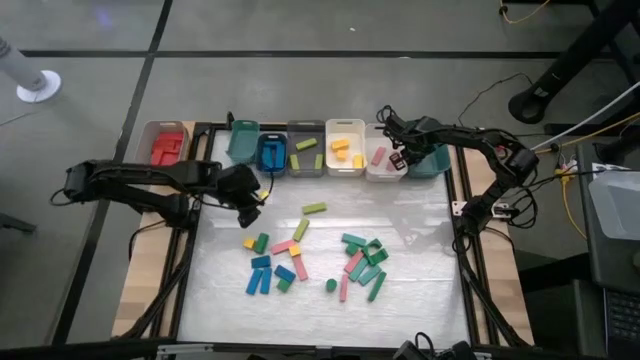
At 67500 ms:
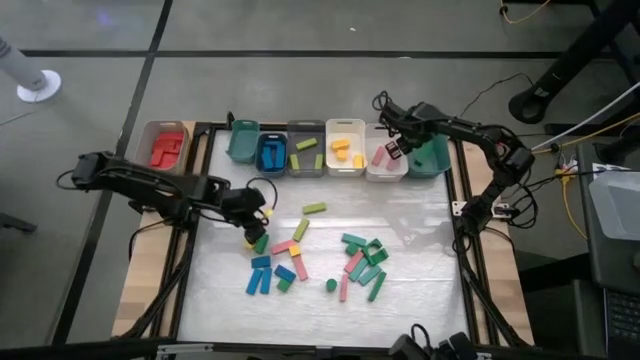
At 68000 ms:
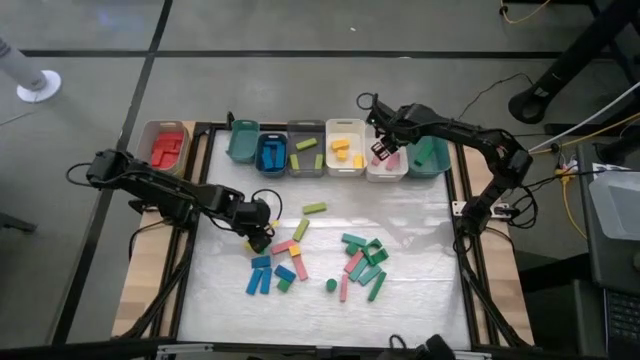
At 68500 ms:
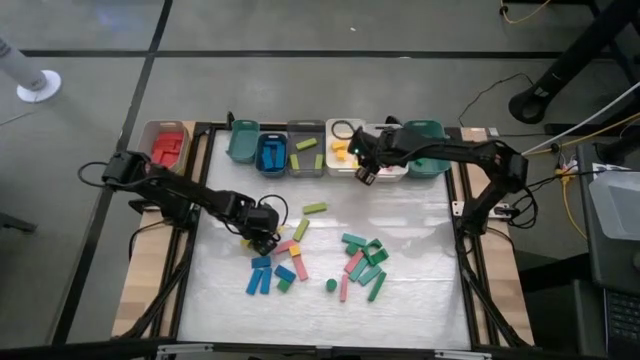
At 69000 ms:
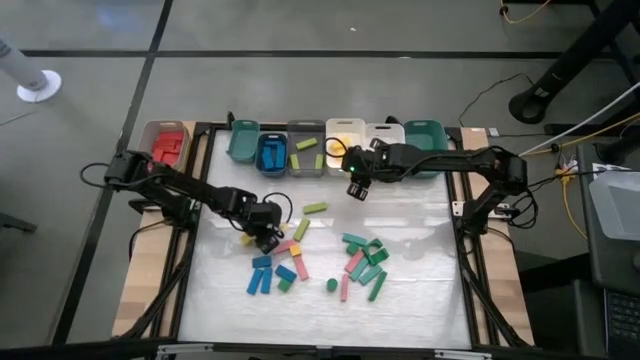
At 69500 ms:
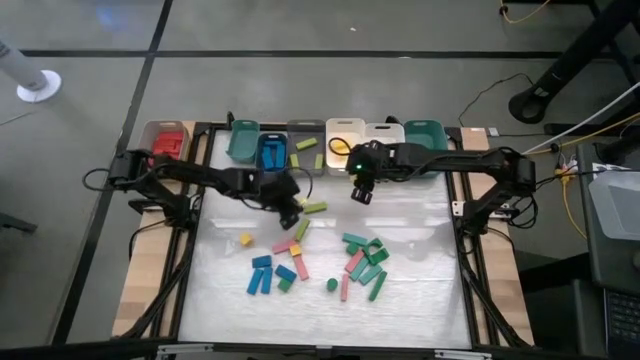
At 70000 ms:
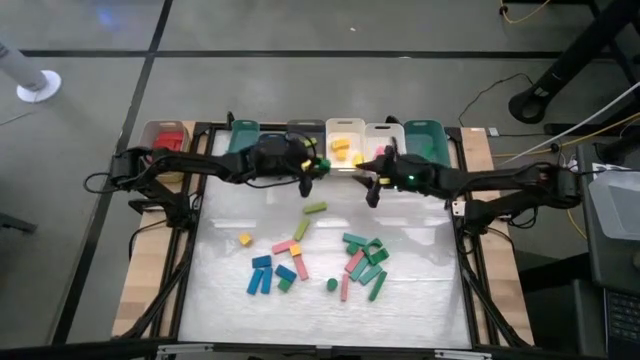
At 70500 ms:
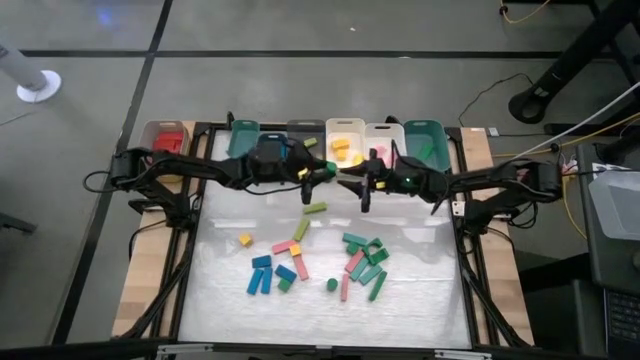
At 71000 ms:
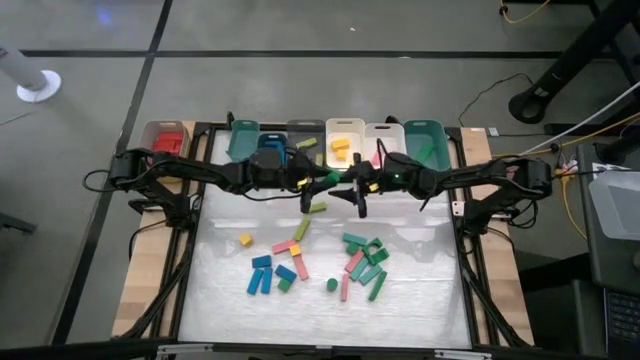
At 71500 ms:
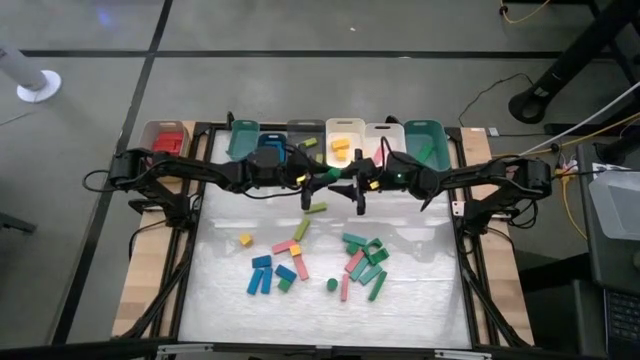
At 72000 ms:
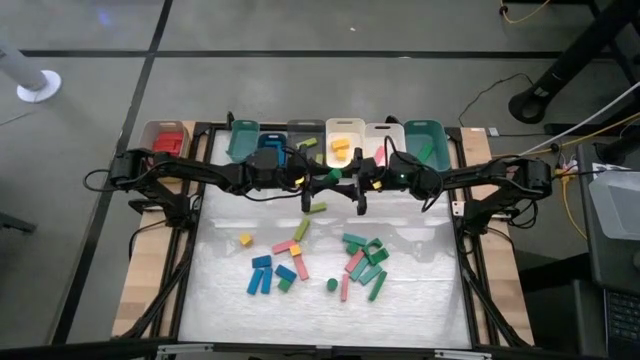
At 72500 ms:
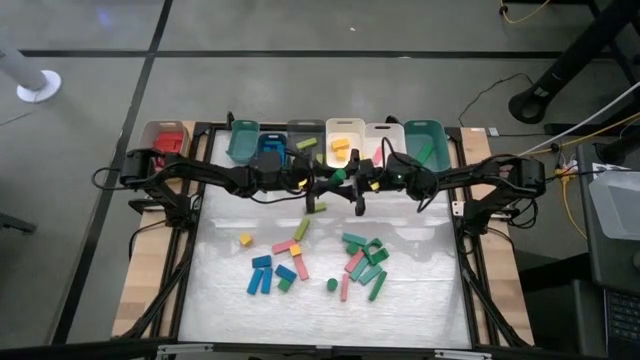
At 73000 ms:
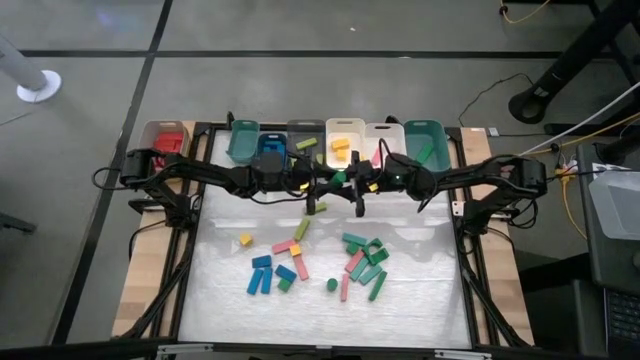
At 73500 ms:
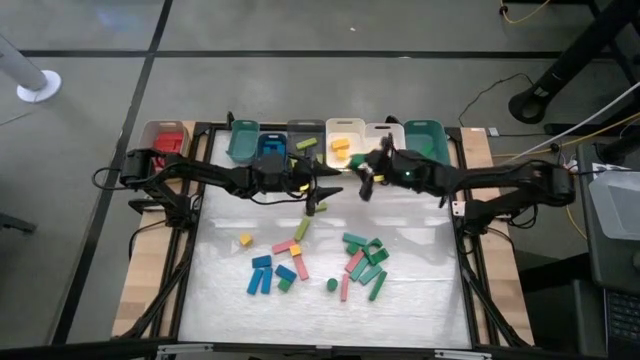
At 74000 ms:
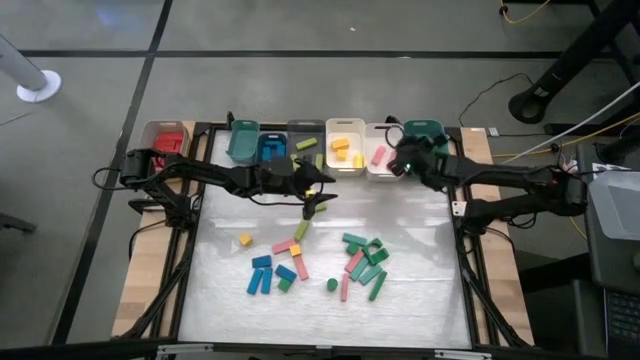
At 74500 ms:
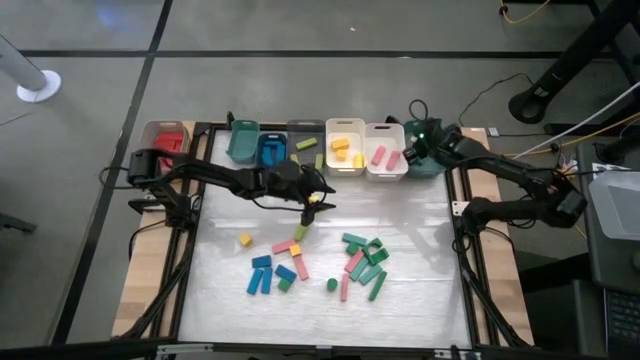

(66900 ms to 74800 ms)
Task: Sort blocks
Put the green block into the right green bin

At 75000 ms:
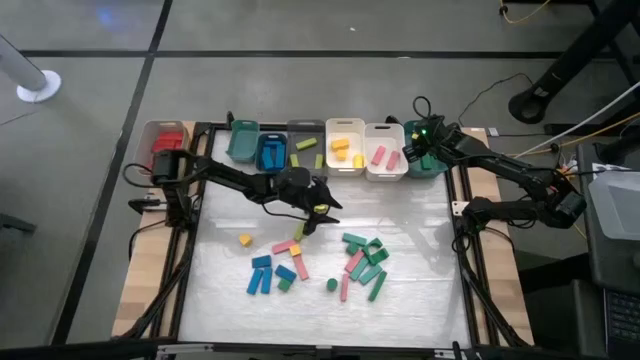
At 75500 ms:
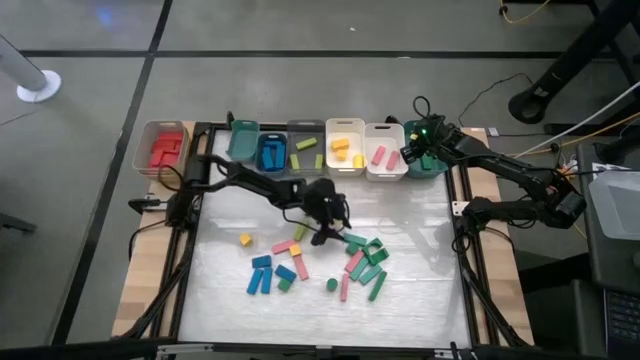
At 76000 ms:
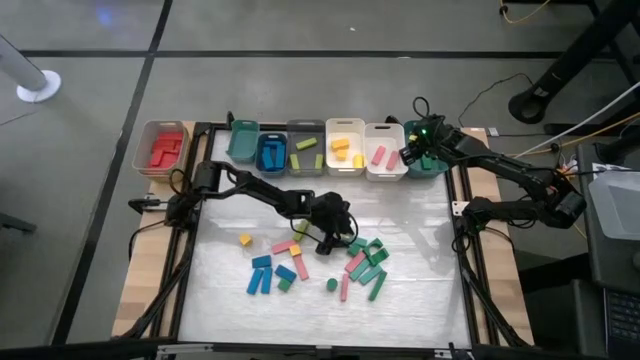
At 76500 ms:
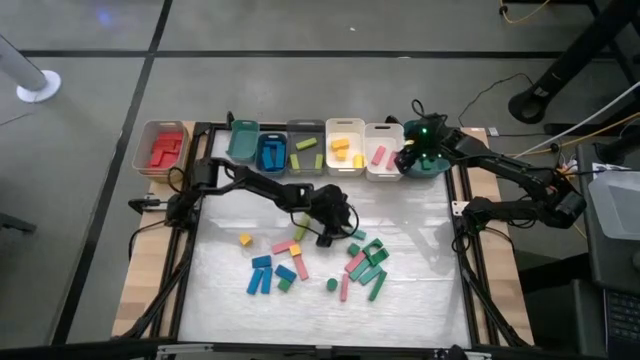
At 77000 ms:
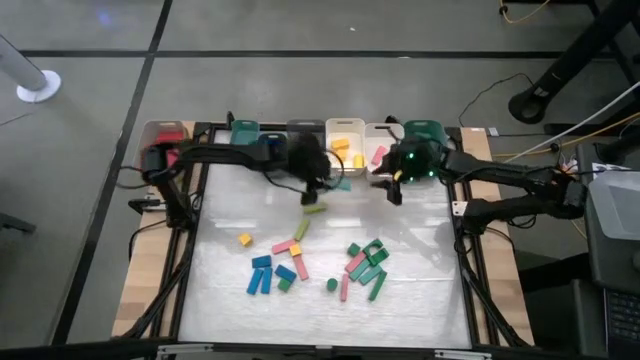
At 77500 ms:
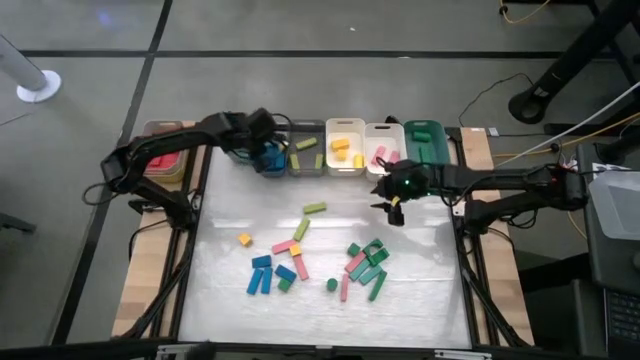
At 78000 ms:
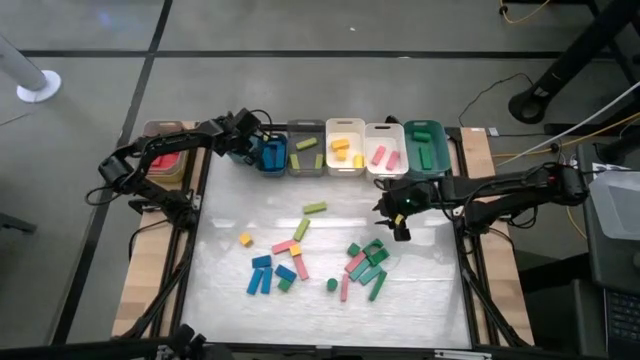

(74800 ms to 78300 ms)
Put the light blue block into the left green bin

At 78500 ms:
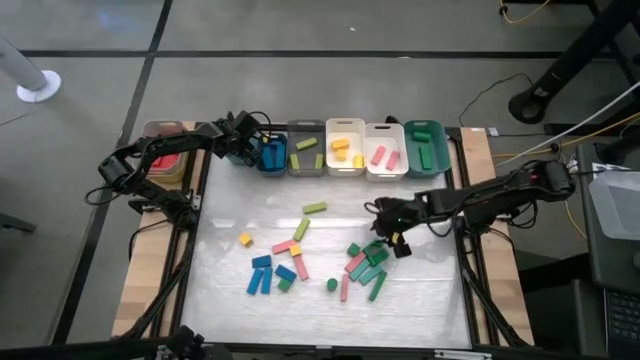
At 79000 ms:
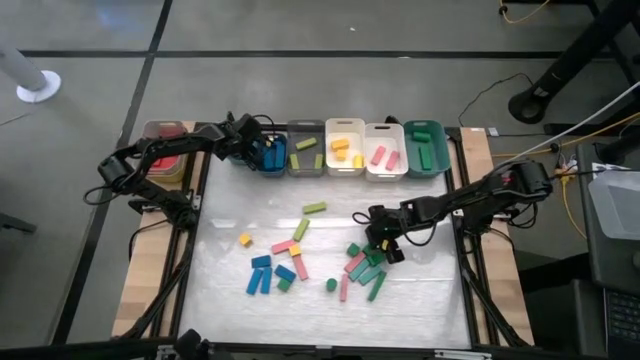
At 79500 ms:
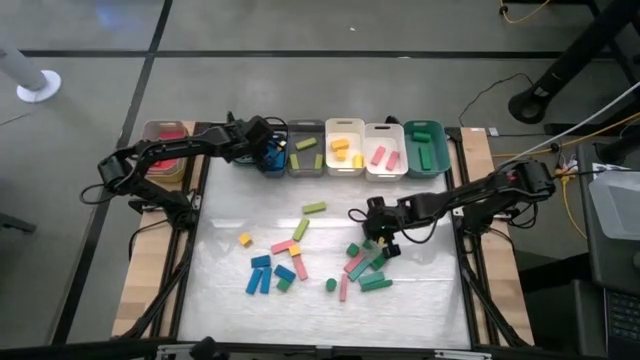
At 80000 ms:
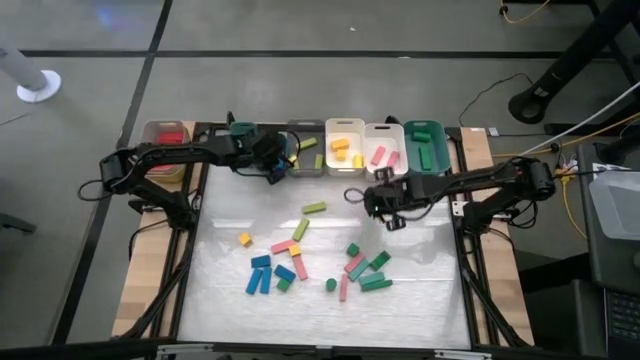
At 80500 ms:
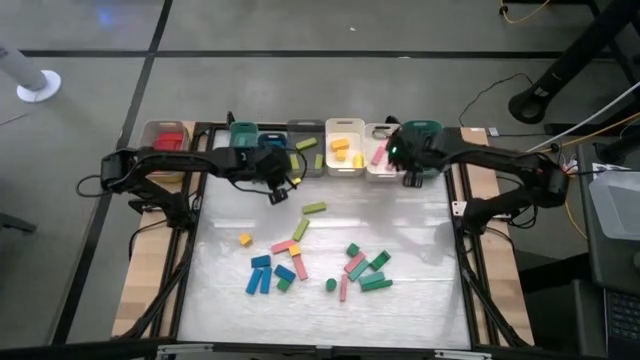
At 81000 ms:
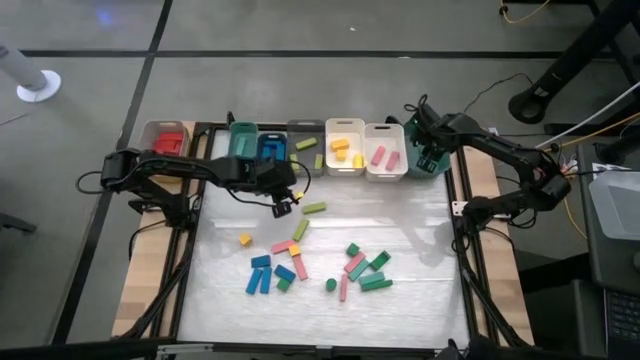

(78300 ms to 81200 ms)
Put the green block into the right green bin

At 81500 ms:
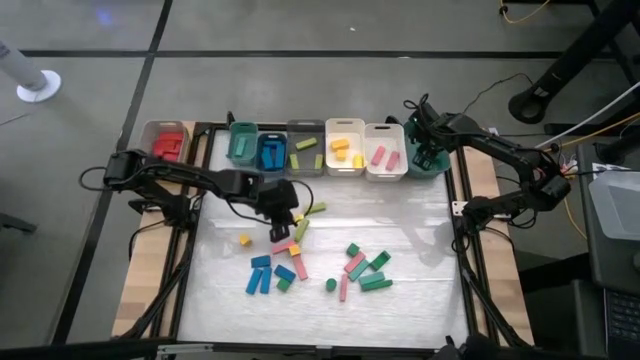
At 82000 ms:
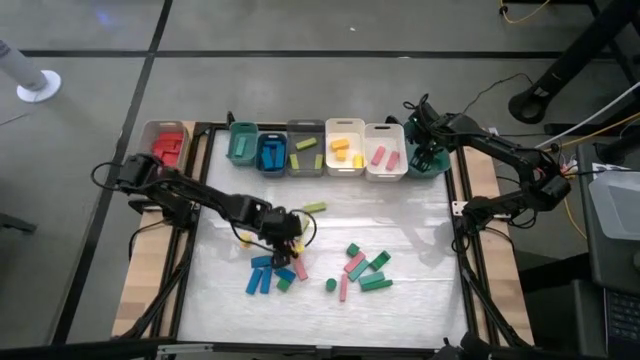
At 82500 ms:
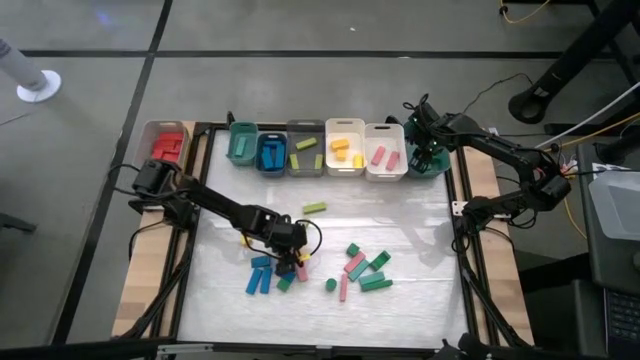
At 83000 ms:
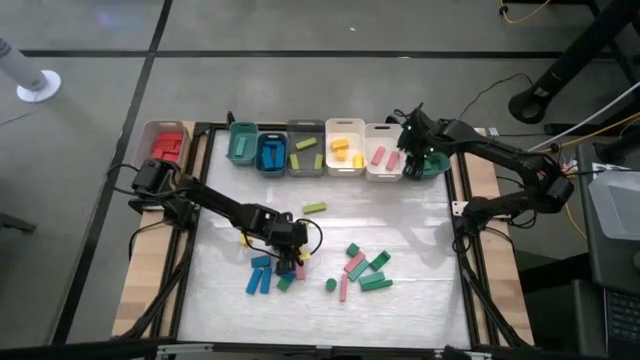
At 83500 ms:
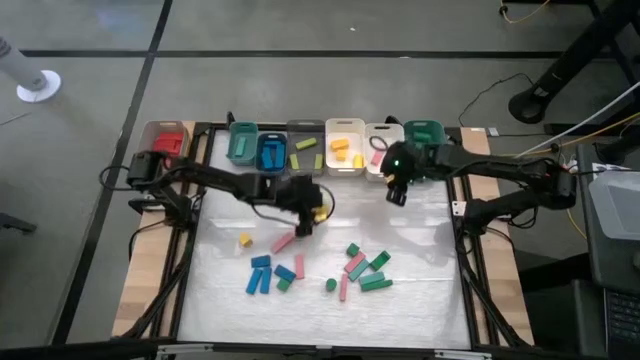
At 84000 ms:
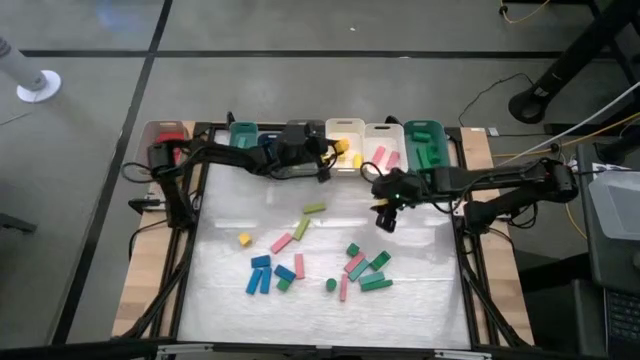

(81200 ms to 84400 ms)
Put the yellow block into the left white bin

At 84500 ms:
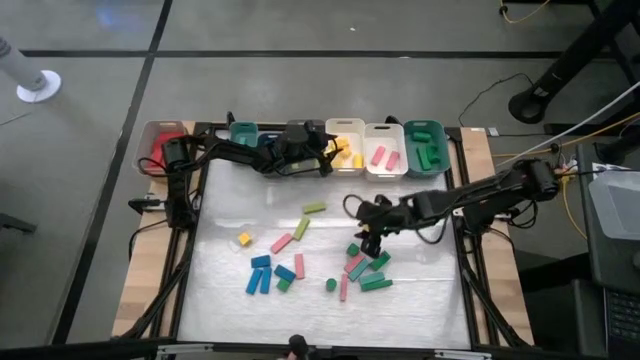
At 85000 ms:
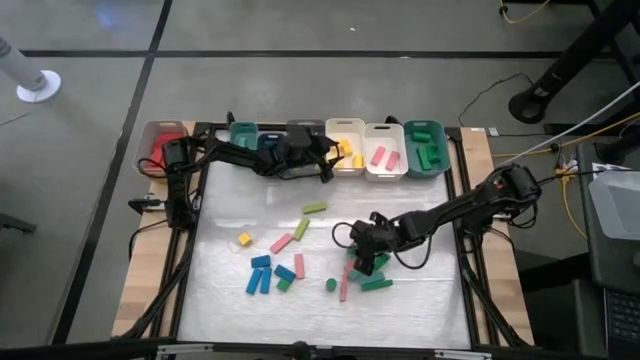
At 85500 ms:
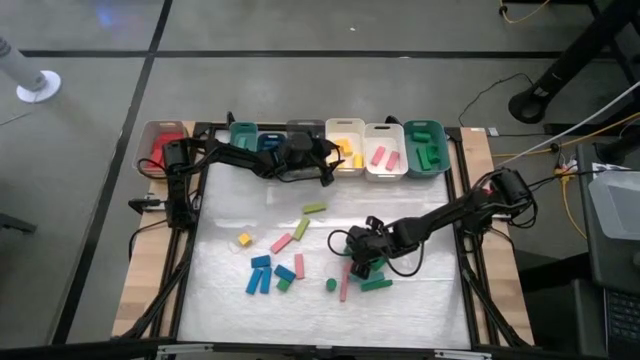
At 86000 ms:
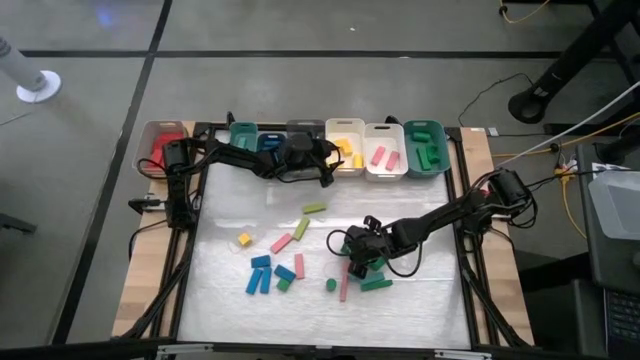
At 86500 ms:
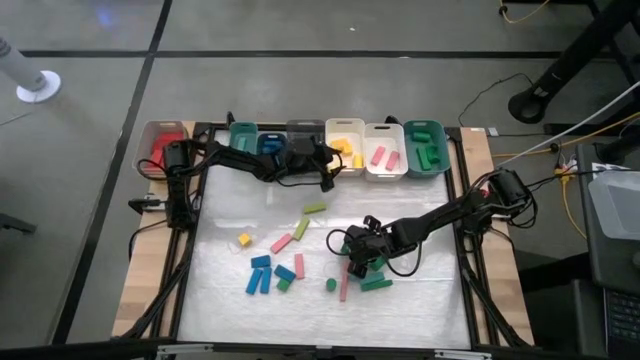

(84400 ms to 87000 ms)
Put the green block into the right green bin

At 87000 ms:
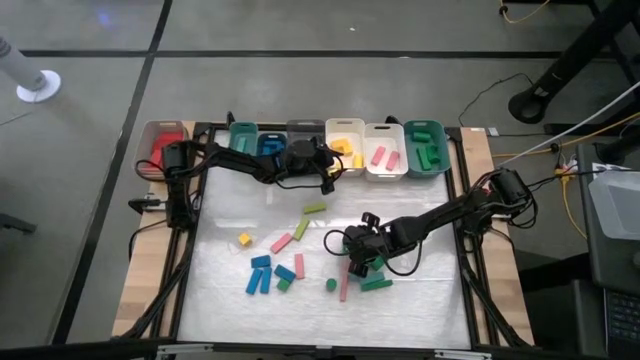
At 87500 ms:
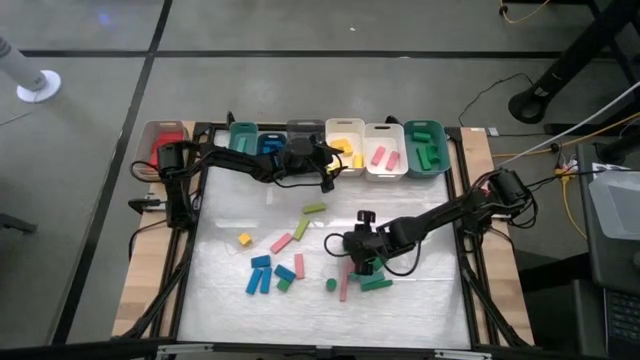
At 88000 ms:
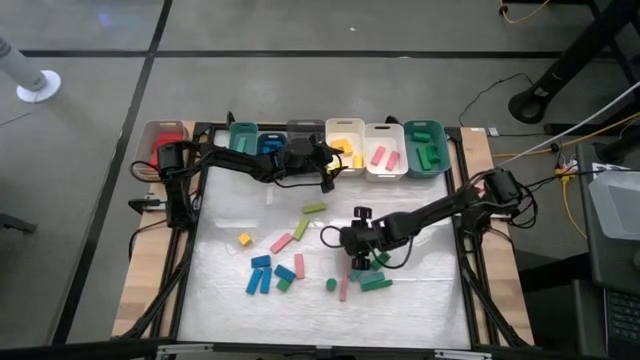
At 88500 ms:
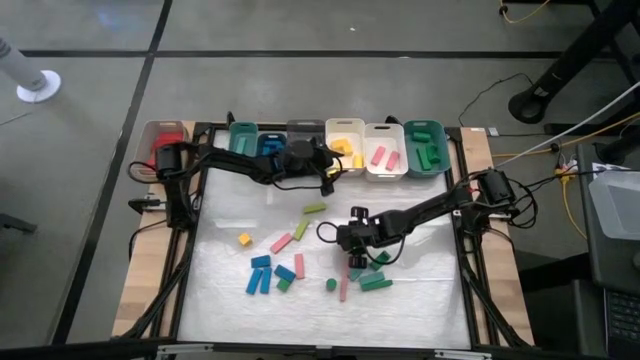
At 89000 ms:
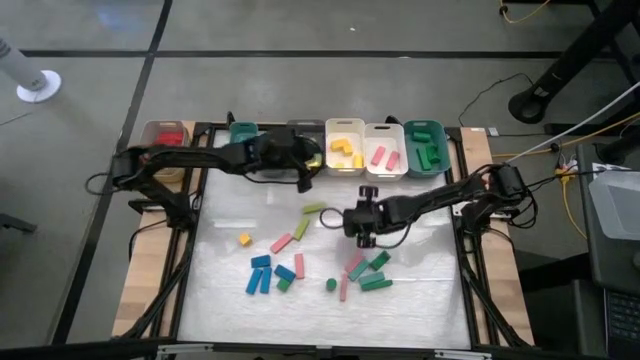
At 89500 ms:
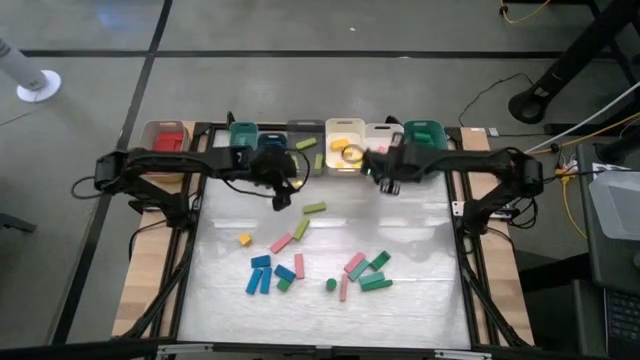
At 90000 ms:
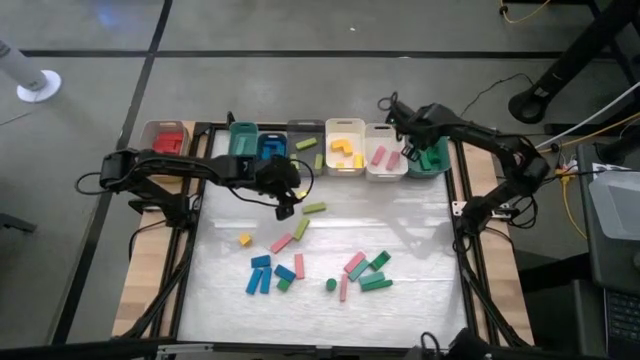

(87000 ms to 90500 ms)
Put the green block into the right green bin
